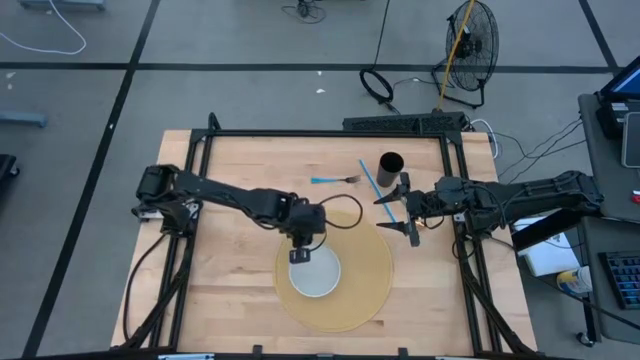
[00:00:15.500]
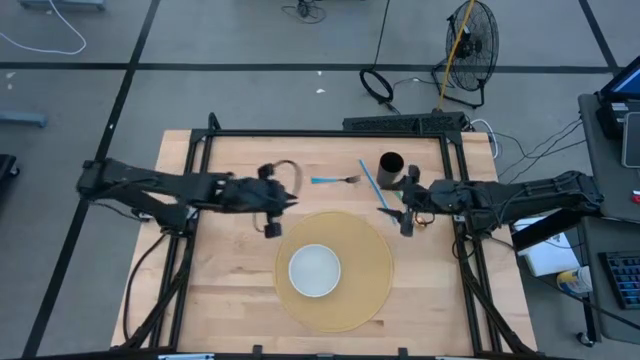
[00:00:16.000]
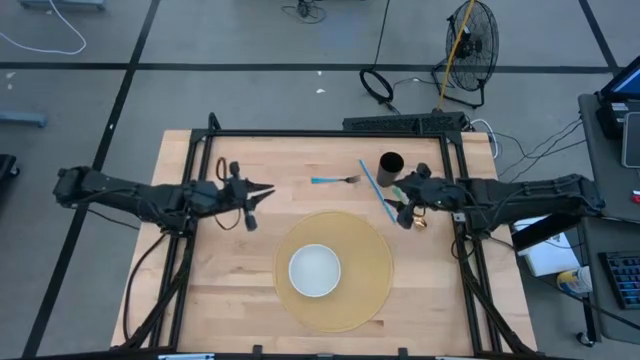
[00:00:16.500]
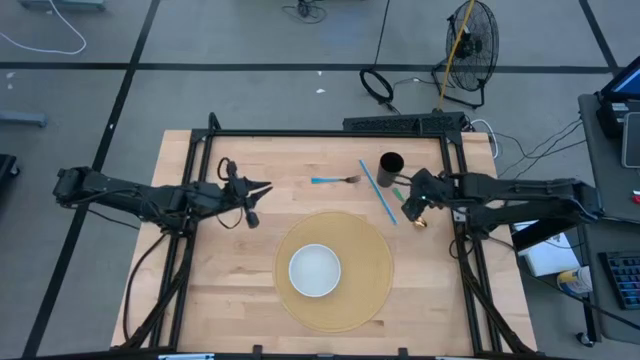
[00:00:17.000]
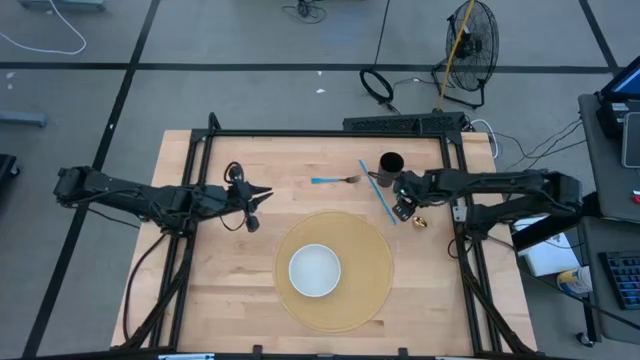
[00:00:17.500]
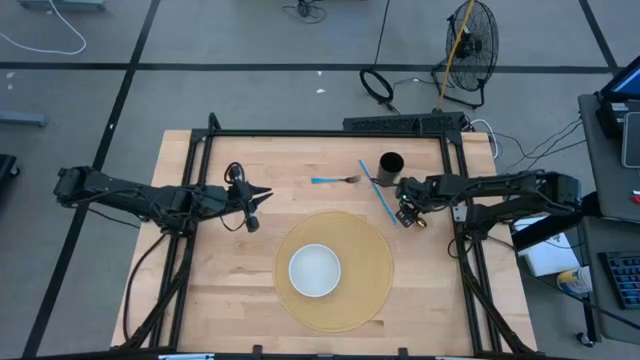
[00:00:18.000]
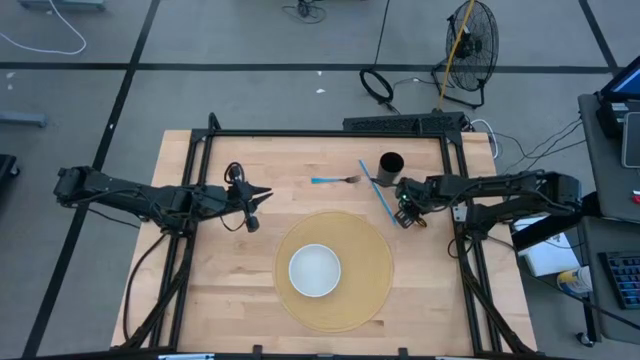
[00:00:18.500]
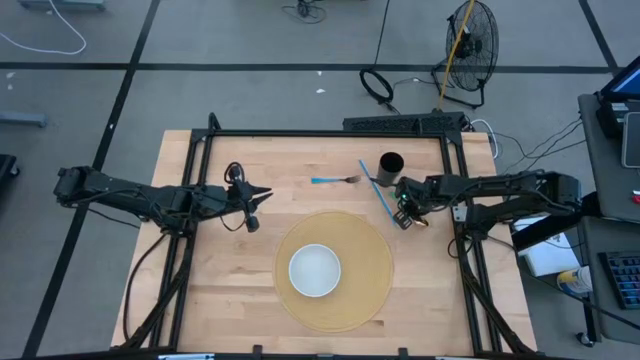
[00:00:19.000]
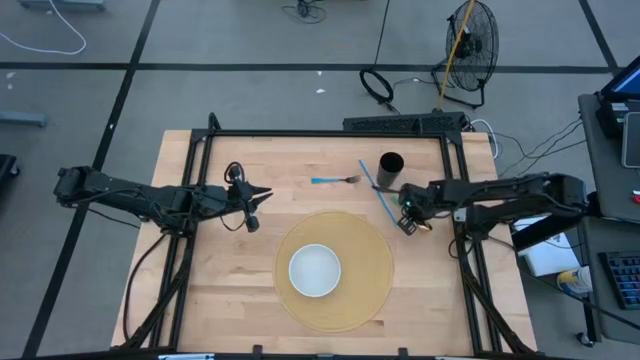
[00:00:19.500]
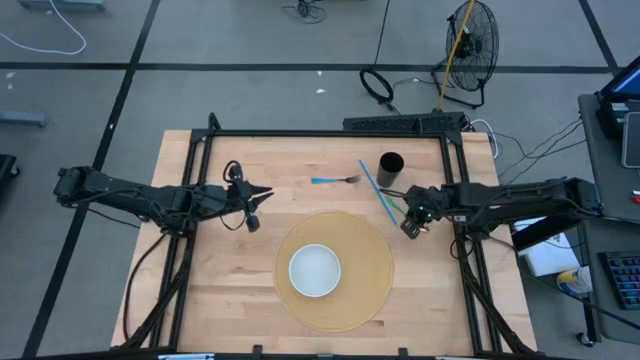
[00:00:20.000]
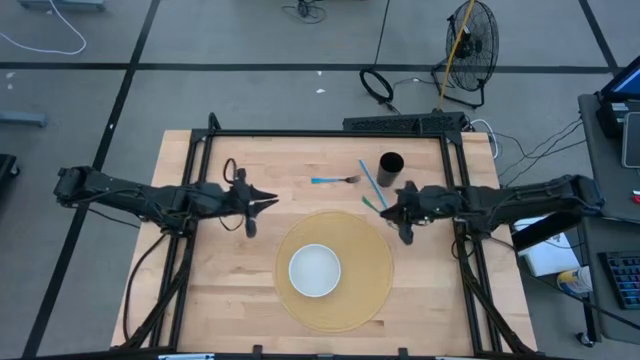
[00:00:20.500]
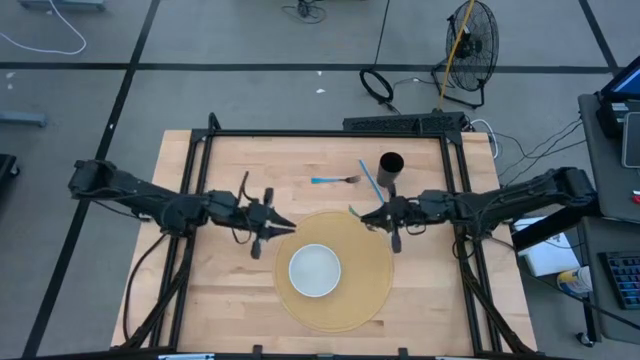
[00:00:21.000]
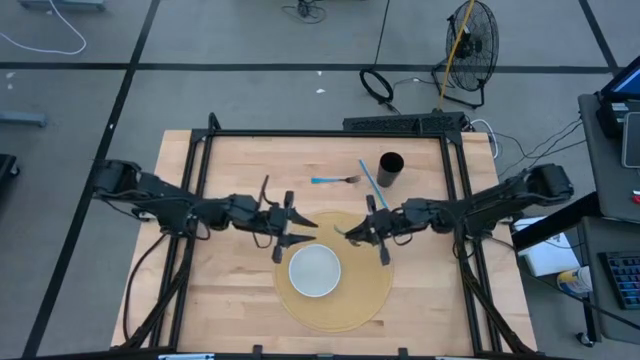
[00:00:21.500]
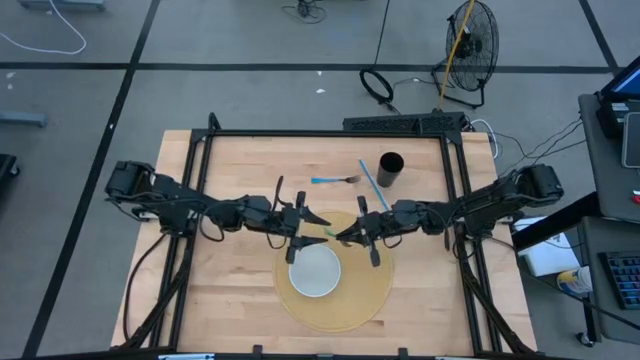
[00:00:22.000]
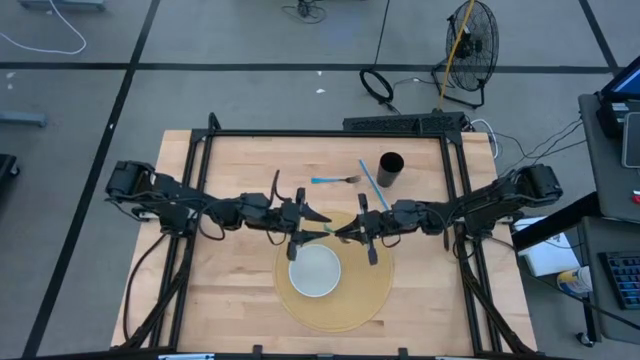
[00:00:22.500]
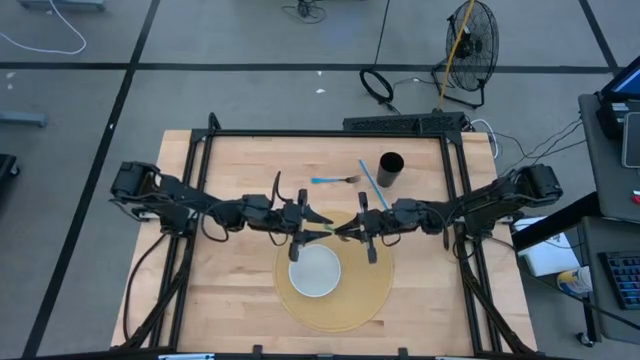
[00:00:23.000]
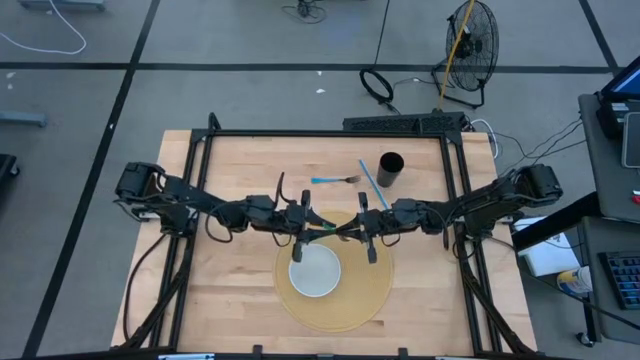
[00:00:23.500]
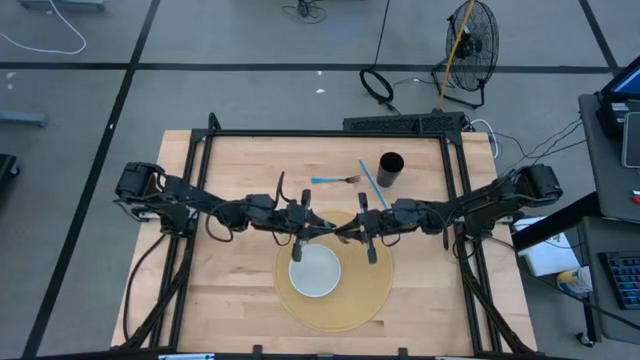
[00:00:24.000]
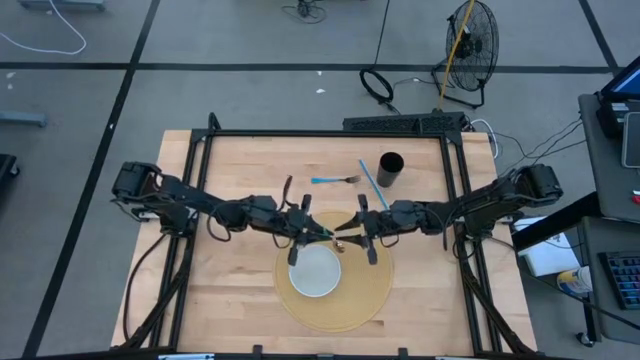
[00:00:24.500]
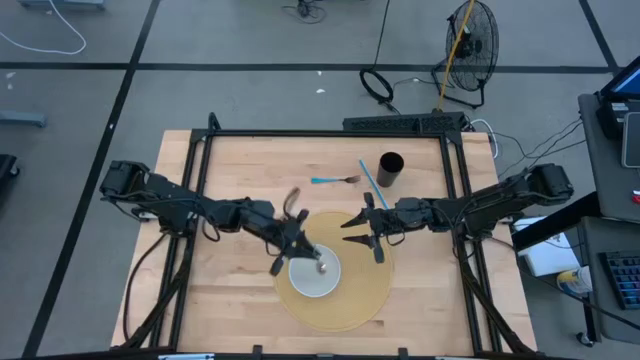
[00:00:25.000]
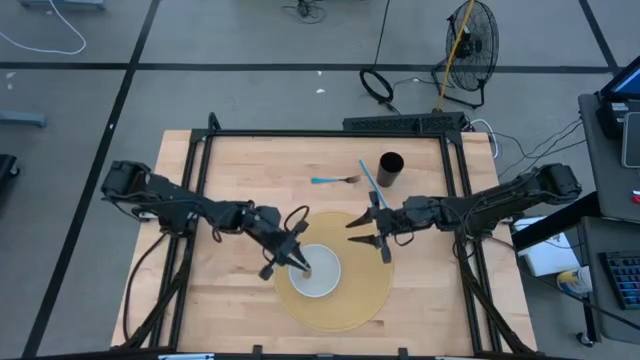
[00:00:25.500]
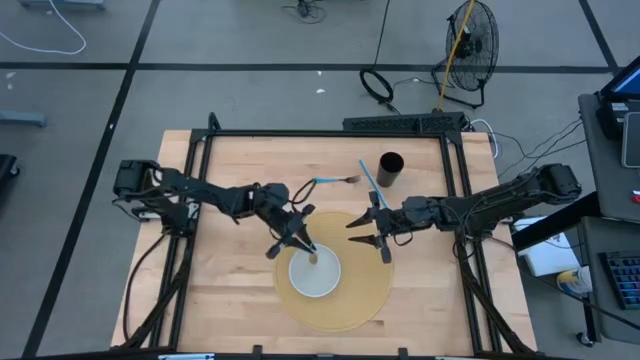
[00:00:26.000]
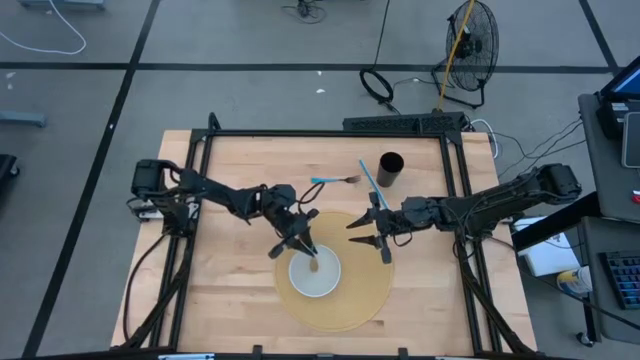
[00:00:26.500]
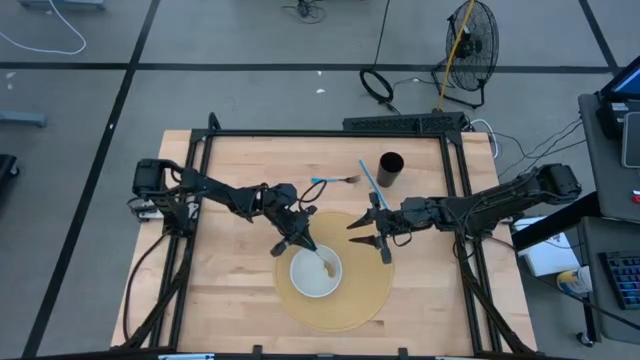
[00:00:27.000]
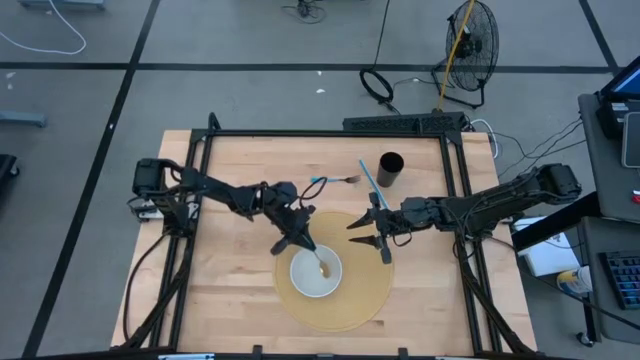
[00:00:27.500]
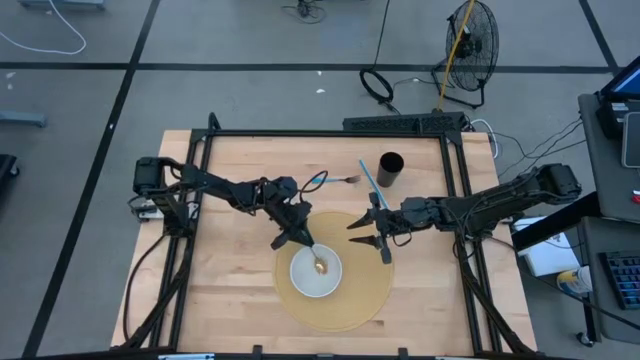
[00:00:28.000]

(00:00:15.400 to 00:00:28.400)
Task: Pick & Place Utensil
Put the green spoon into the white bowl

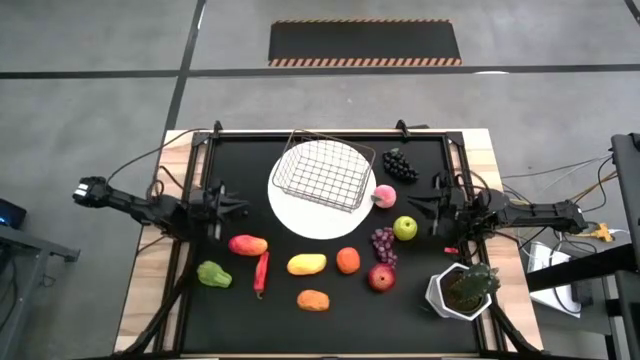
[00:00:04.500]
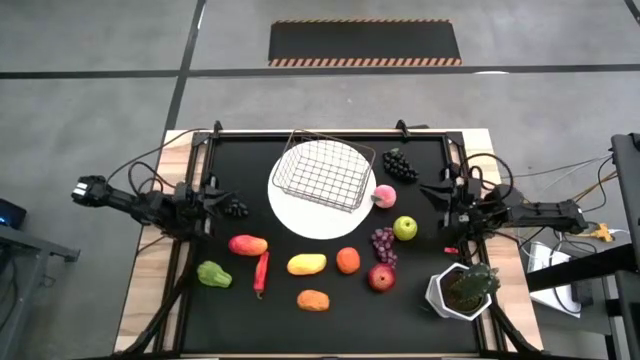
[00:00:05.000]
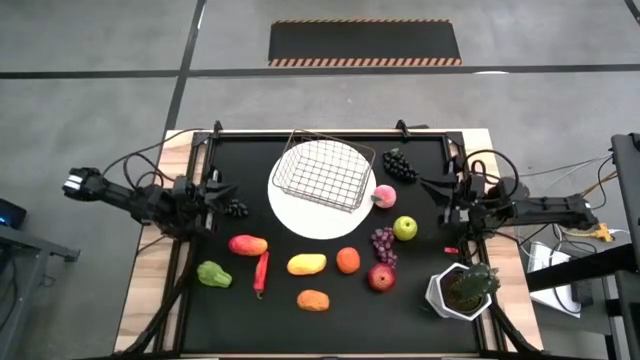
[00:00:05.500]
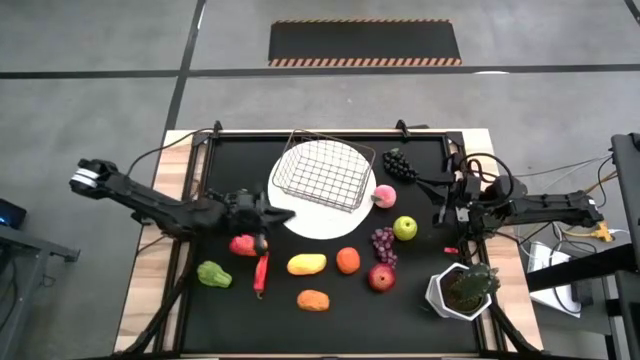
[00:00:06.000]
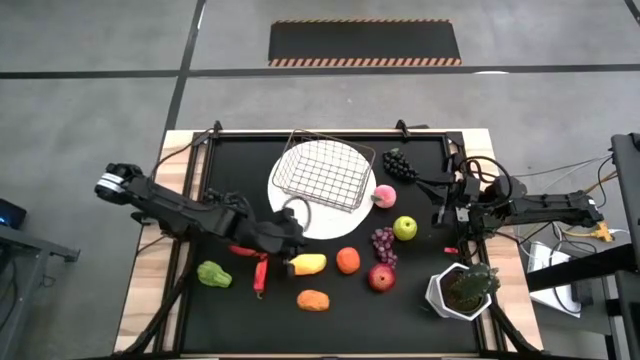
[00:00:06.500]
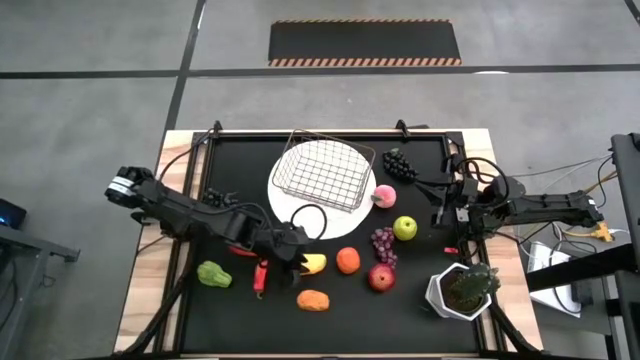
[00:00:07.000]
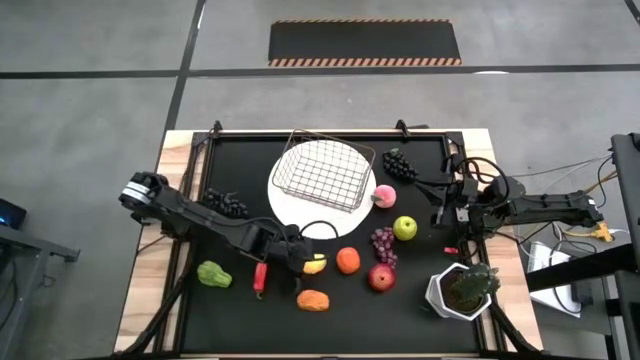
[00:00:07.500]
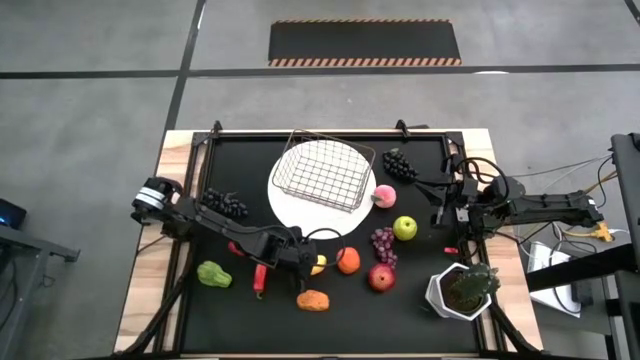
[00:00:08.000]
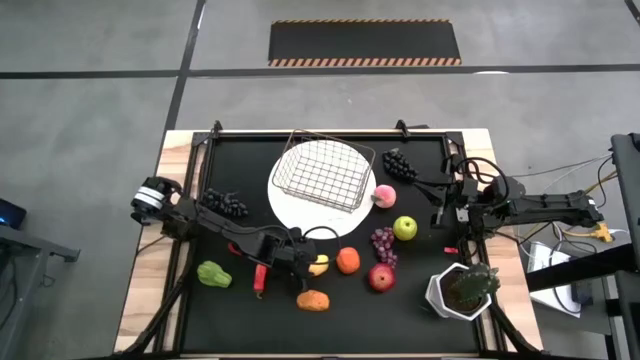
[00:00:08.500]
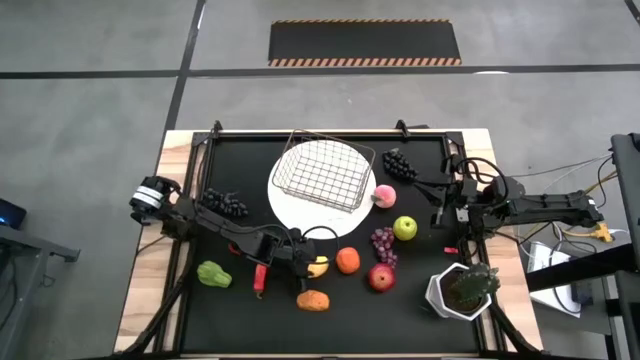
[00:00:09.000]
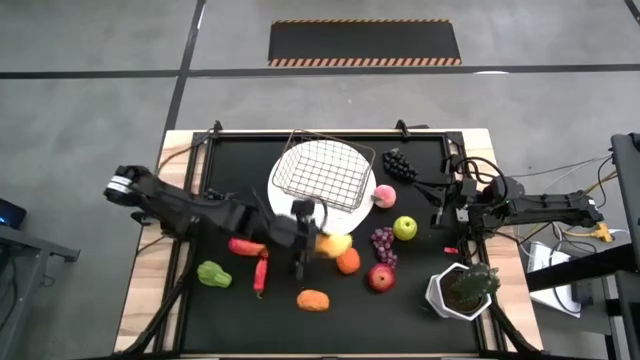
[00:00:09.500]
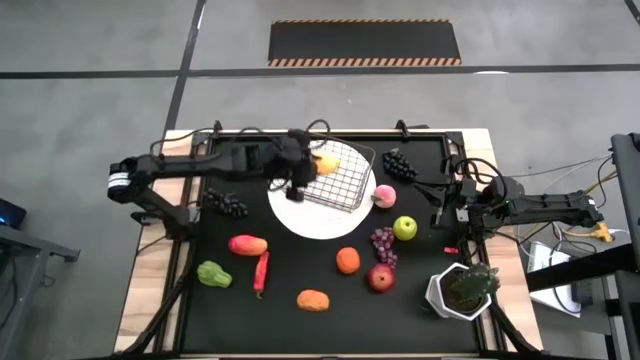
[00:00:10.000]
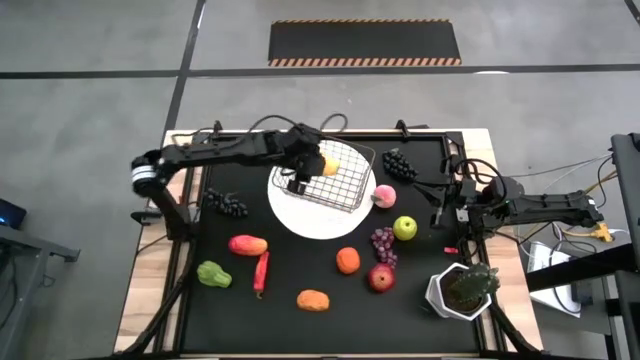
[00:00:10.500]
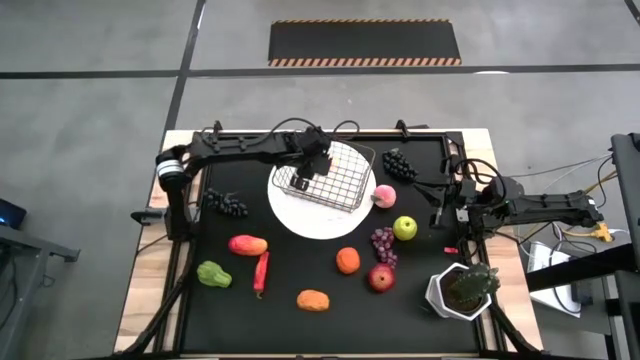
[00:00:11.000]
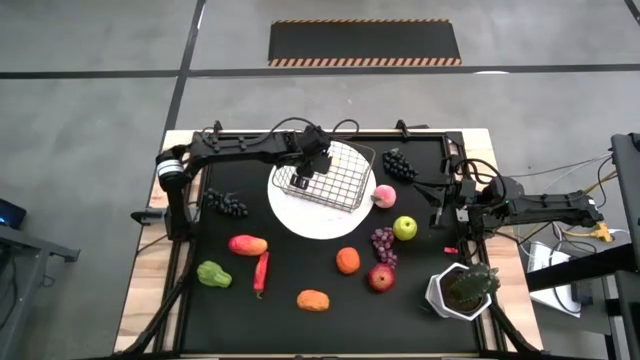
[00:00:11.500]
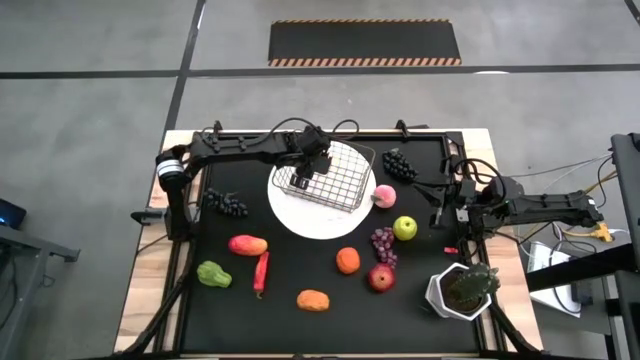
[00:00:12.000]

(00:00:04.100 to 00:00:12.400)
Task: Build produce basket
Put the yellow mango into the silver basket
